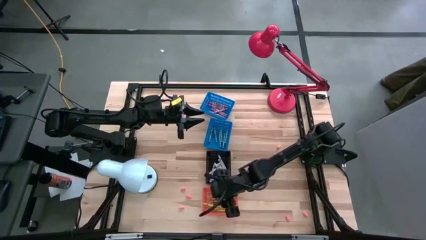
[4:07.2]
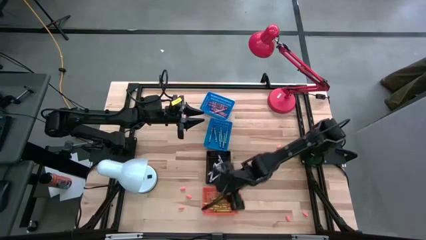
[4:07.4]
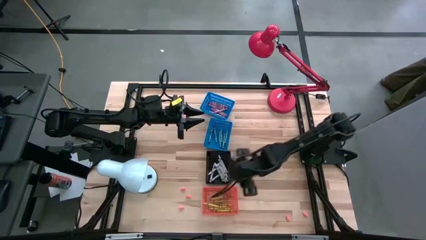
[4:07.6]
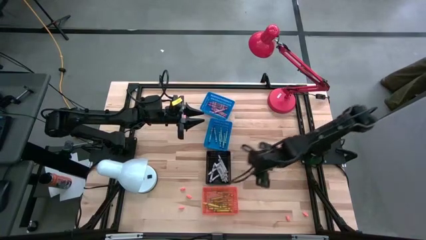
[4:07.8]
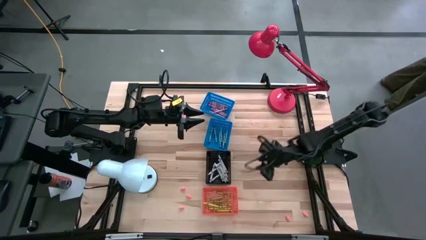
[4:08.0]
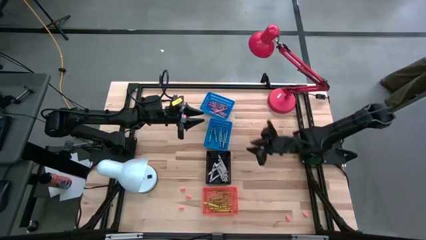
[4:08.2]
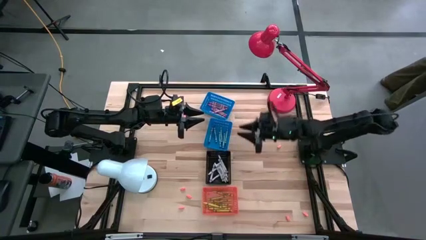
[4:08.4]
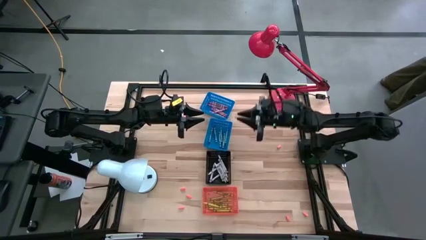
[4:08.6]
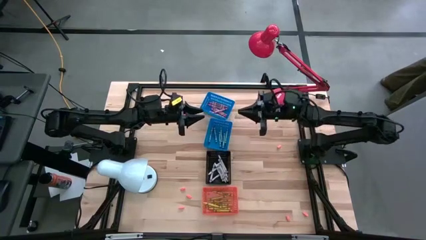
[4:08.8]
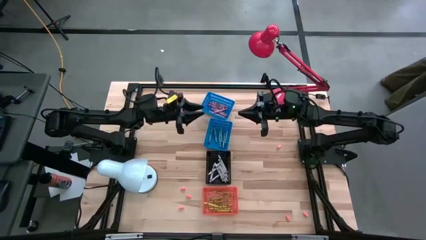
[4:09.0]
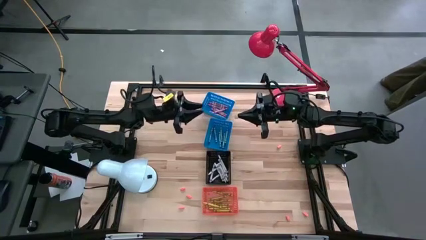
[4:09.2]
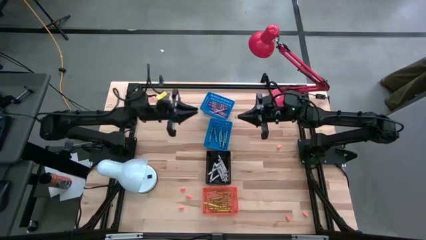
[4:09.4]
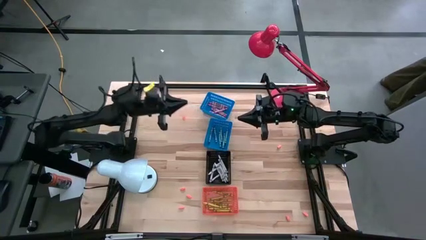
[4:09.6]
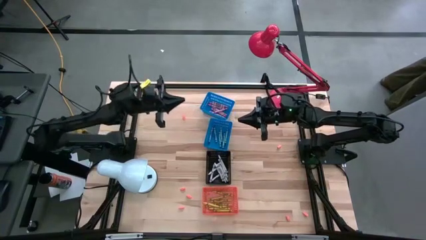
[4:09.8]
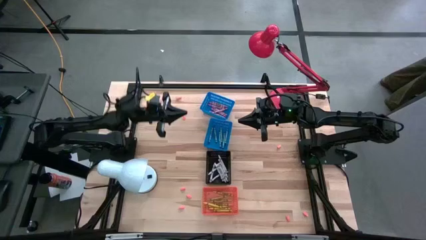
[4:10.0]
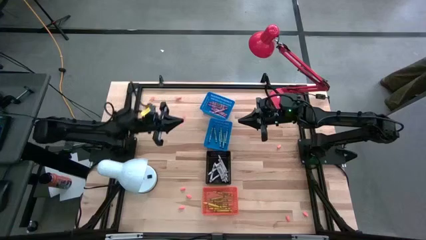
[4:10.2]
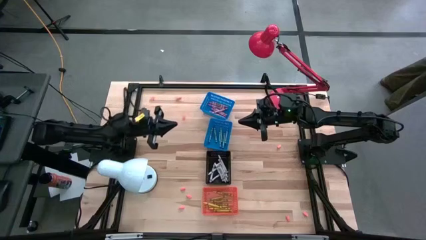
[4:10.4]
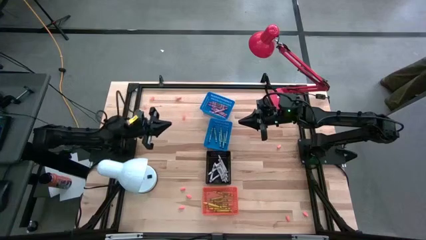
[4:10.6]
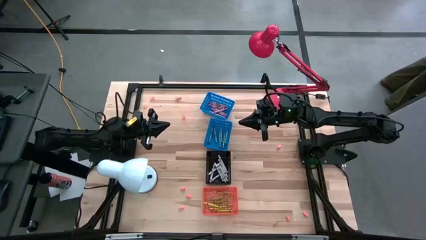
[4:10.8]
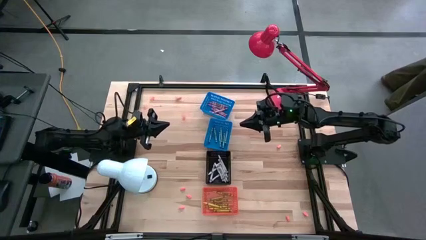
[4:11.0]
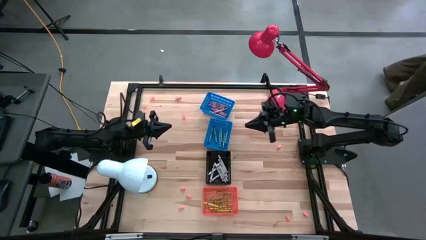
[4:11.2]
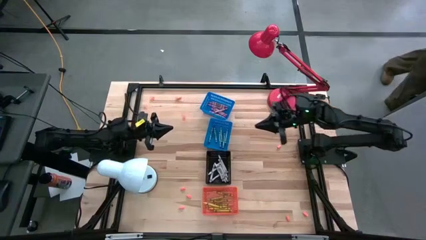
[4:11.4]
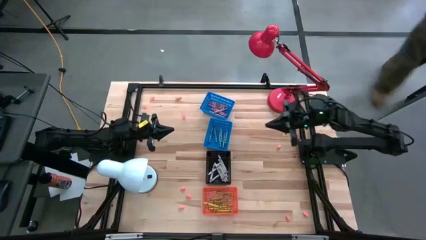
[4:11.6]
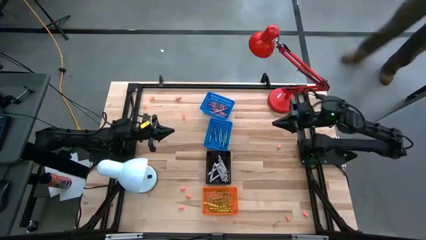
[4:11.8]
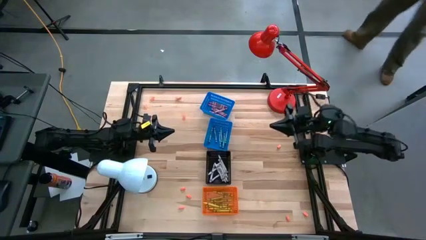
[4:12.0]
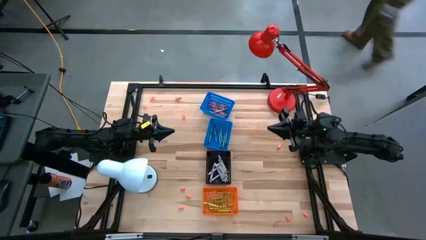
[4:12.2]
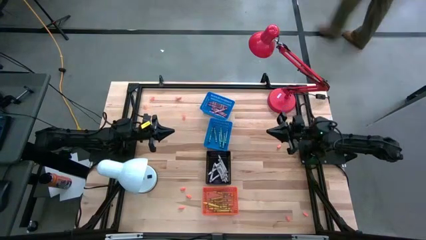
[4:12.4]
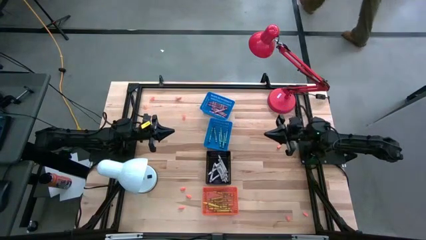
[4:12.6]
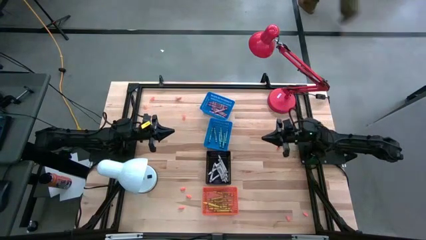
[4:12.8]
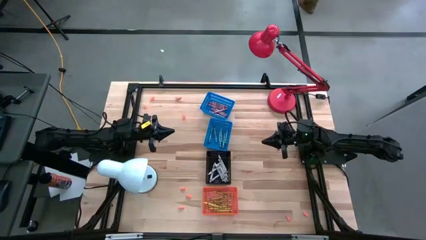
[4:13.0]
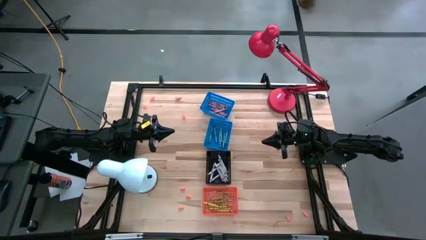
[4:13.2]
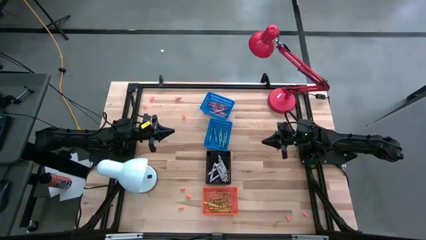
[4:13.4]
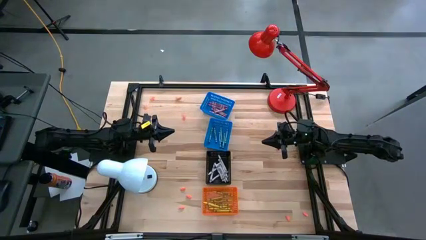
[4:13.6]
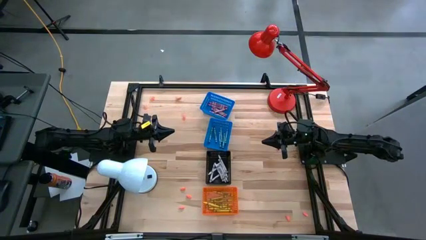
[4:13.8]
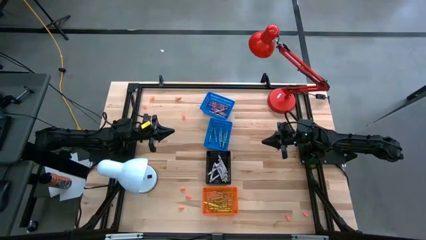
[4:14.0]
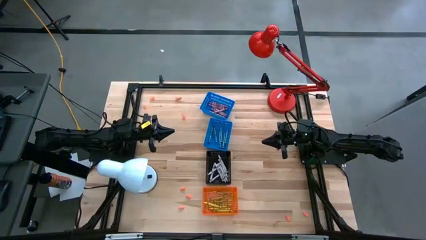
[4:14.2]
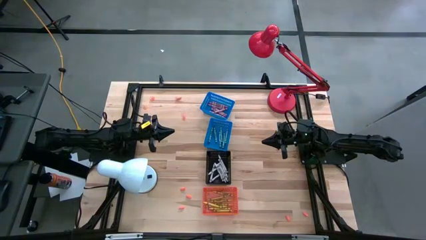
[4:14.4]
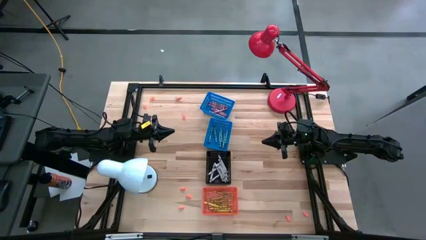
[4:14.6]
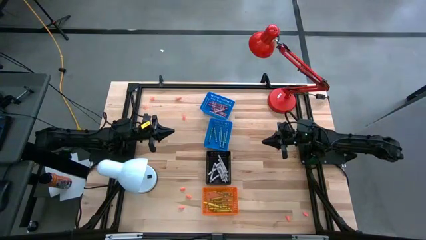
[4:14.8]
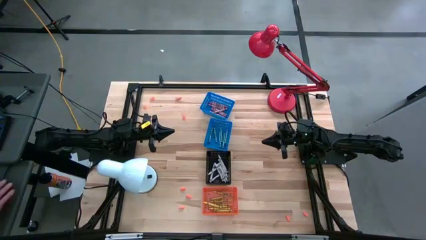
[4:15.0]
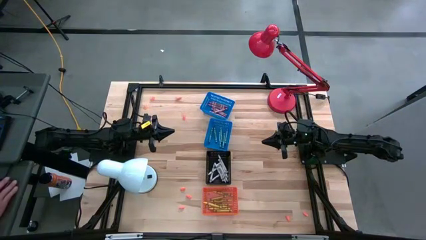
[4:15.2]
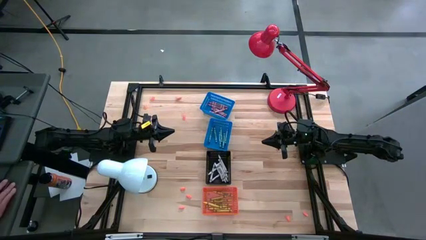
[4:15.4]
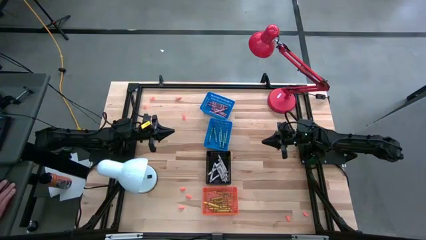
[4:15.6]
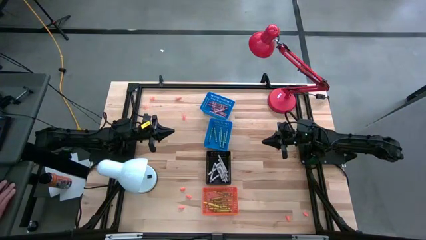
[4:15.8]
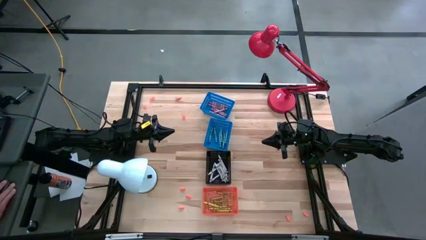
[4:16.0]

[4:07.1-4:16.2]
Task: Sort crayons
Return to Home Position

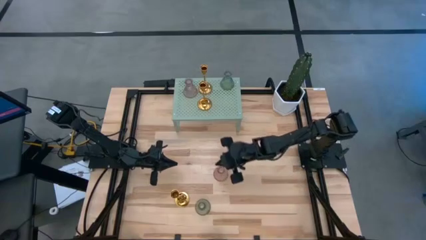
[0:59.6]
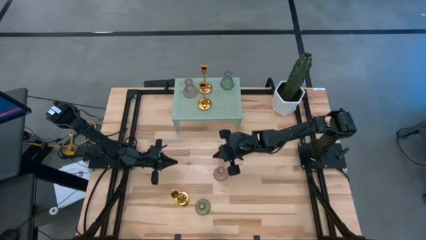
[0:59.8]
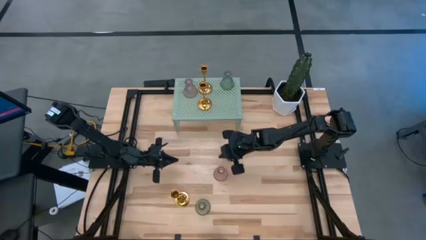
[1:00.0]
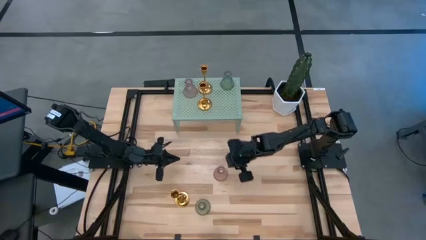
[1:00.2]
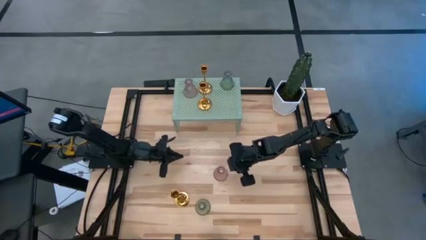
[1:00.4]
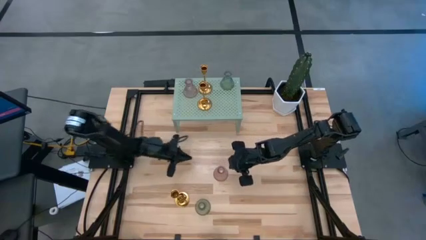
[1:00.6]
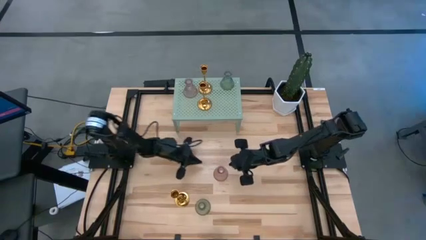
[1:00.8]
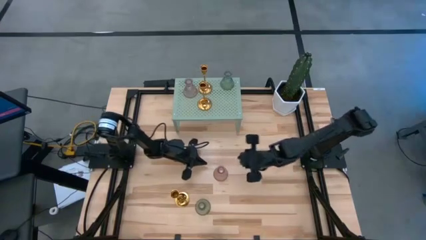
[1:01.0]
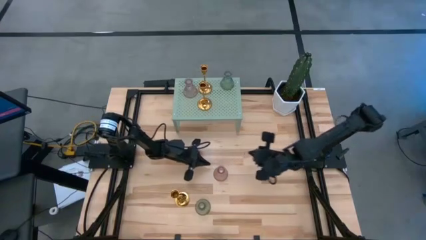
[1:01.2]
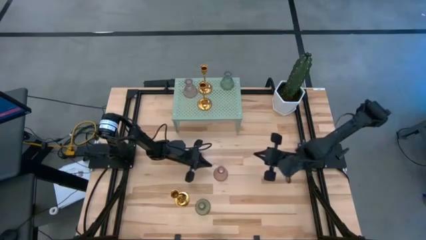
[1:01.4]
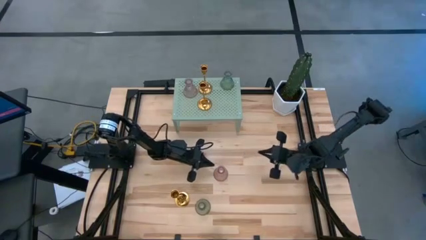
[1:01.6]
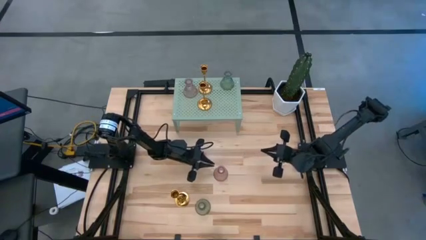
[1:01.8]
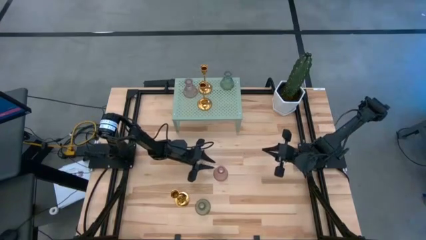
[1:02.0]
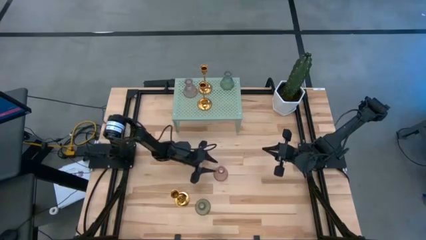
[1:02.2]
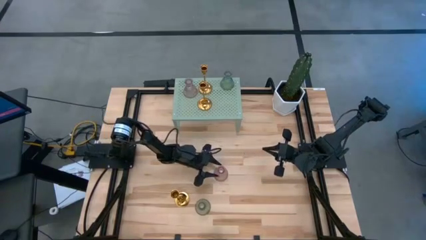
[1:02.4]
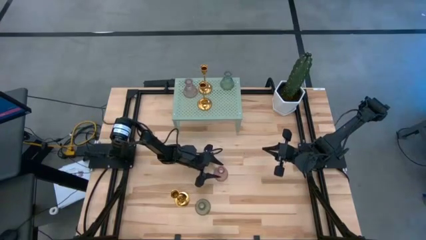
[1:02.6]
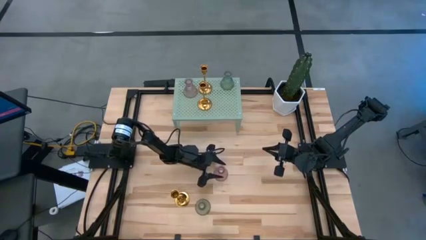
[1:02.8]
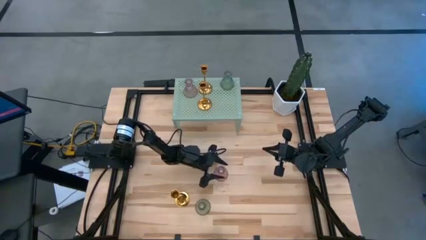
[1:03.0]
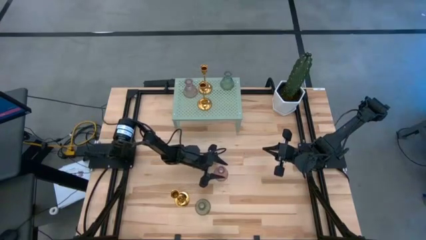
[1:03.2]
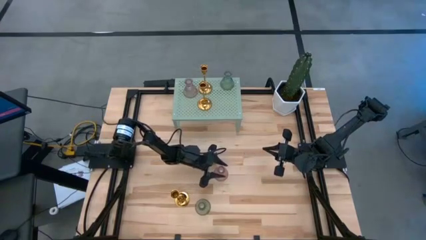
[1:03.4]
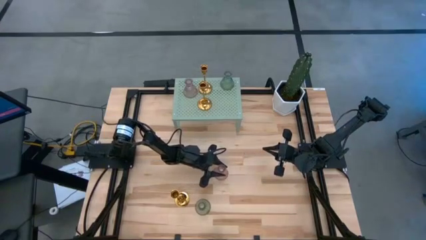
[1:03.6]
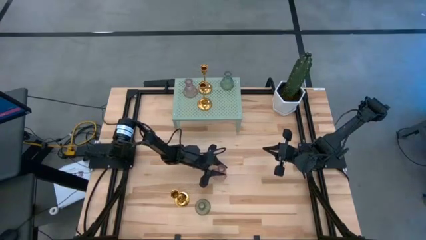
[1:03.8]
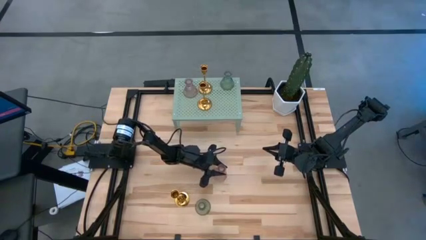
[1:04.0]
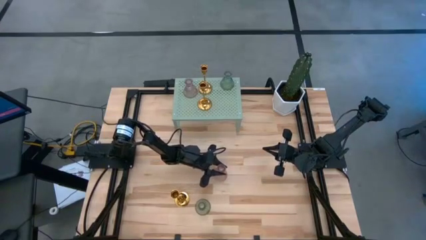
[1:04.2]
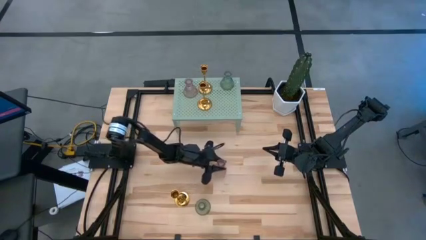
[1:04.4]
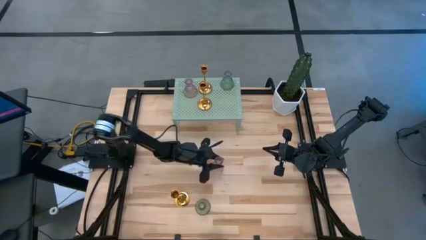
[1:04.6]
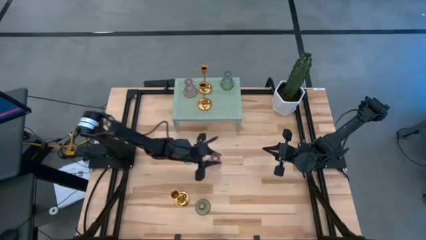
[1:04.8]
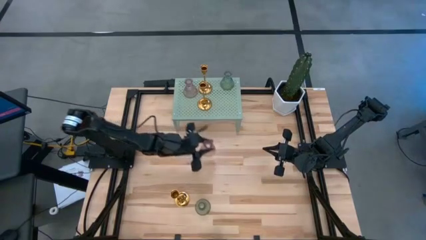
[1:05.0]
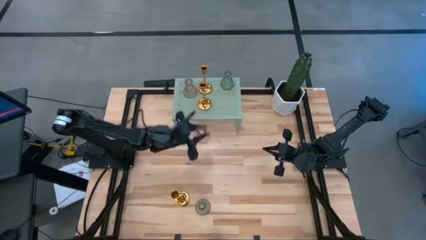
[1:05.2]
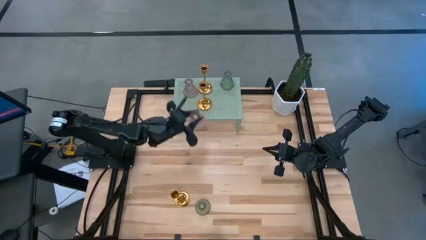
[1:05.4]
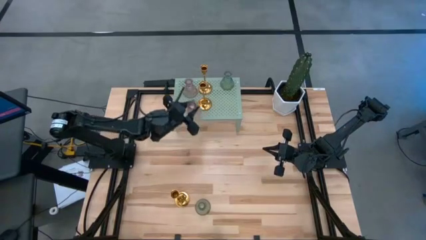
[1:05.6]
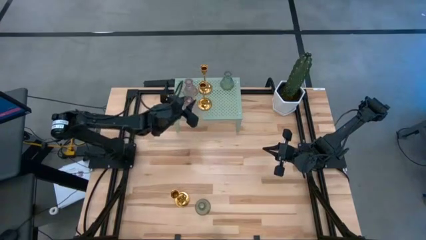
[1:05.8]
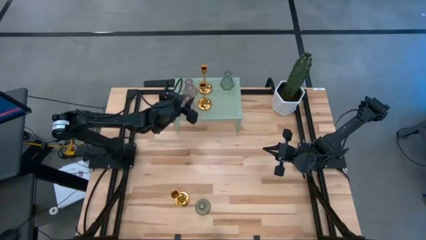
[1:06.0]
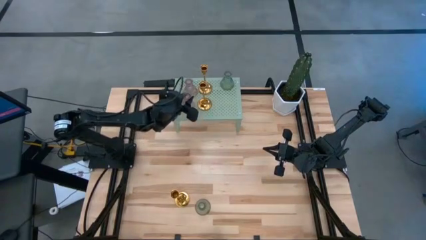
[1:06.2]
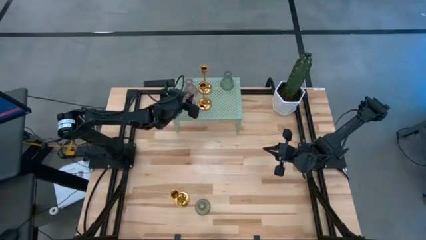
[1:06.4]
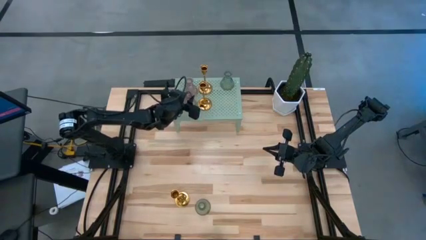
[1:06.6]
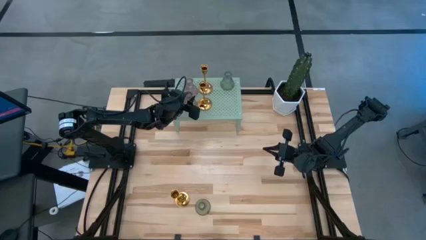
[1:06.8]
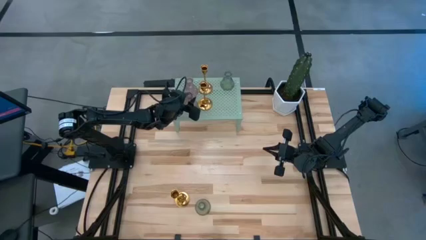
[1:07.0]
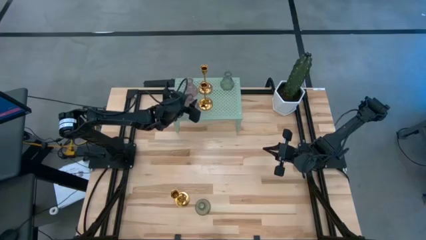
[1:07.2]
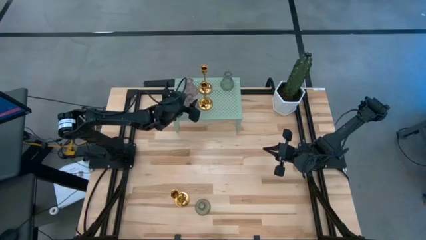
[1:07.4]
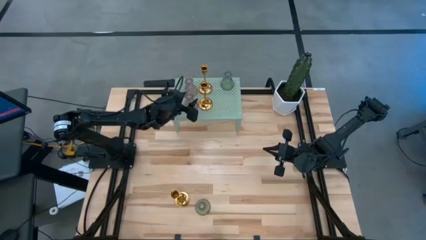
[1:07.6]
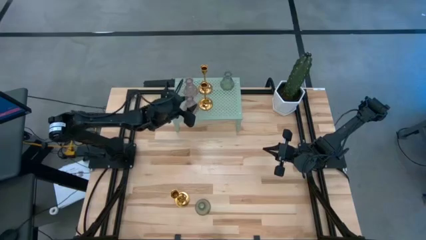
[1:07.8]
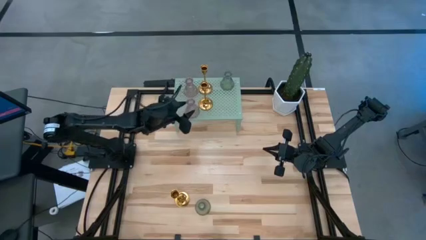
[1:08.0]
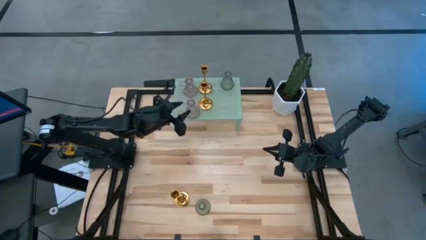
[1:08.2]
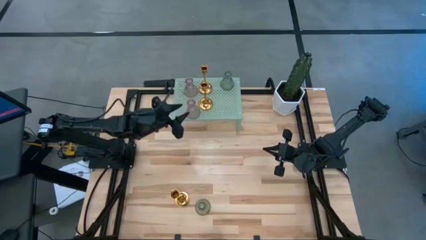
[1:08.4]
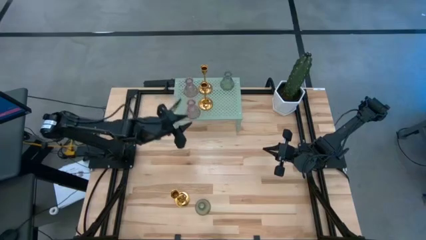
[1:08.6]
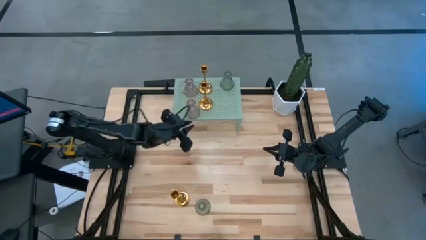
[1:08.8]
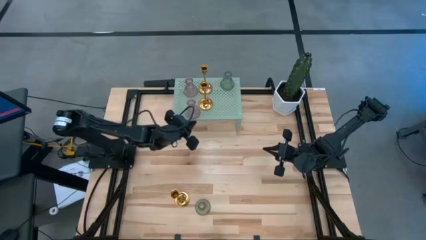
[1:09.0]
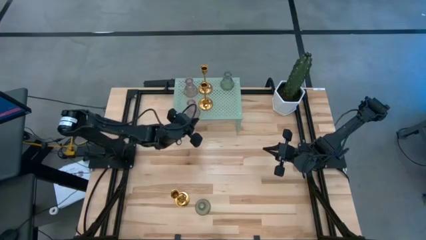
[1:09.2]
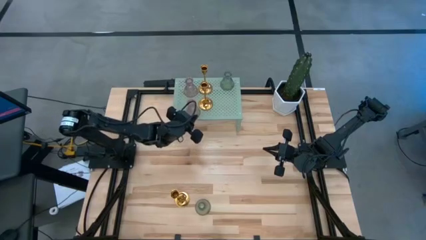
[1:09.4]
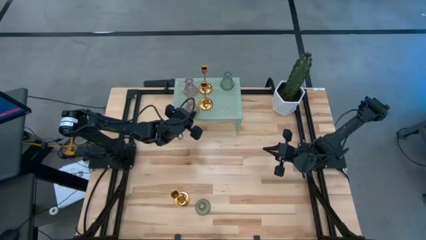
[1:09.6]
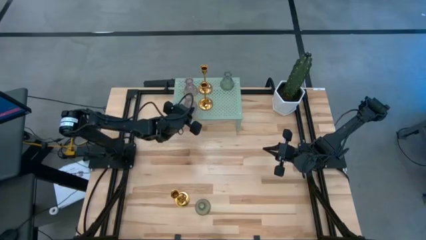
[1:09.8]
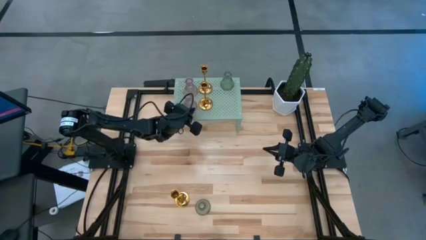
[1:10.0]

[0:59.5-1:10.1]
Task: Pick & Place candle stick holders
Put the pink glass candle holder on the shelf
